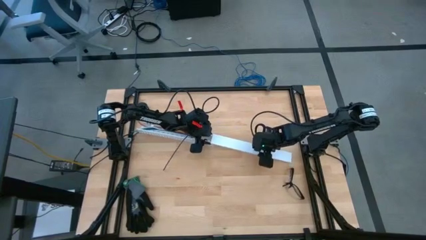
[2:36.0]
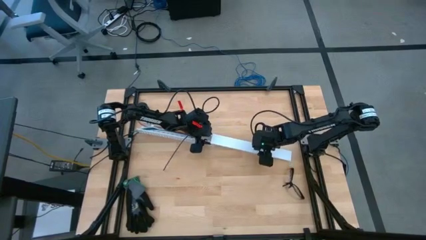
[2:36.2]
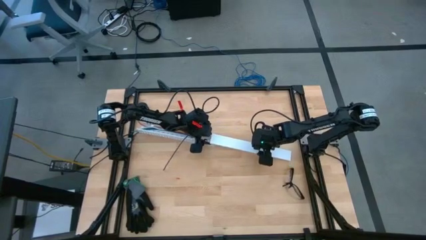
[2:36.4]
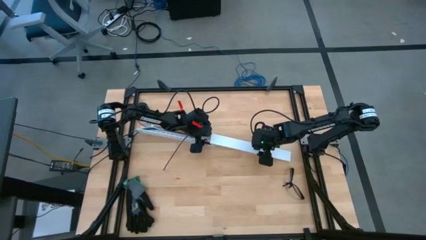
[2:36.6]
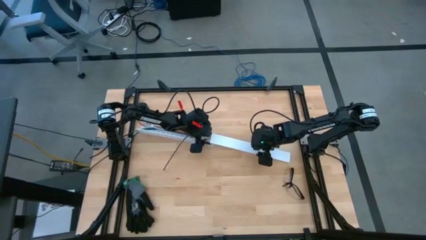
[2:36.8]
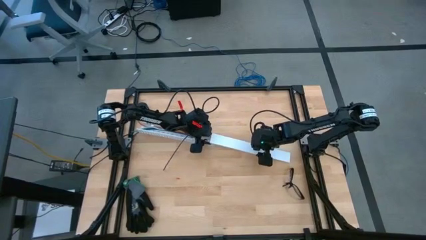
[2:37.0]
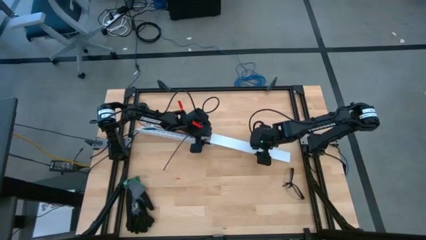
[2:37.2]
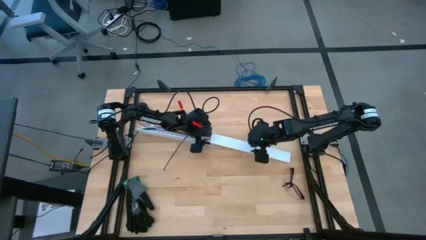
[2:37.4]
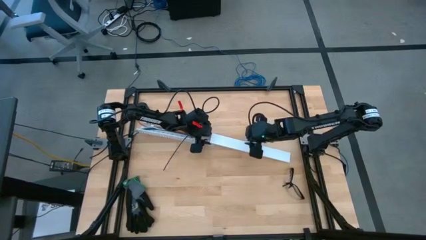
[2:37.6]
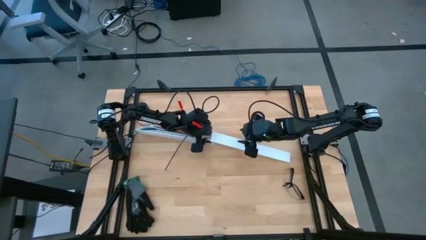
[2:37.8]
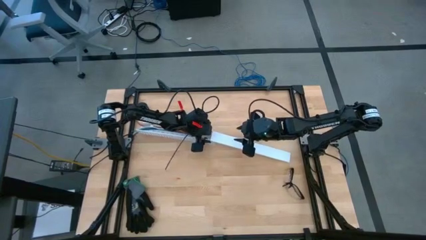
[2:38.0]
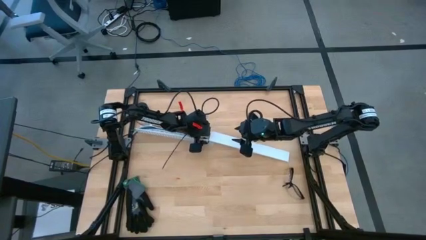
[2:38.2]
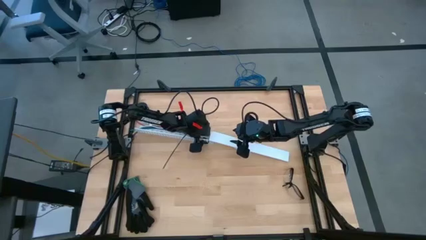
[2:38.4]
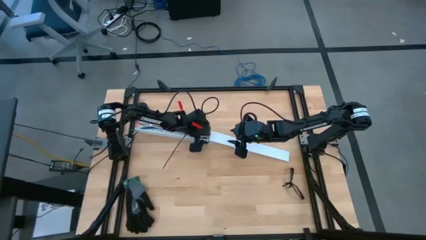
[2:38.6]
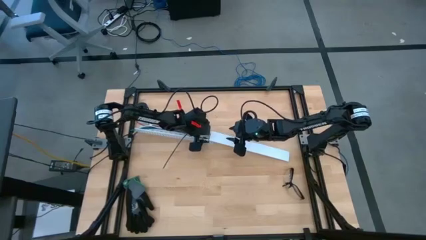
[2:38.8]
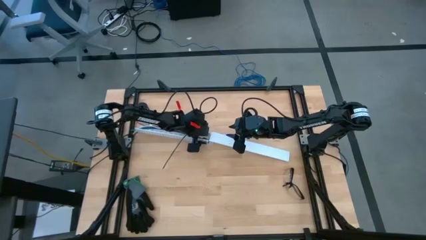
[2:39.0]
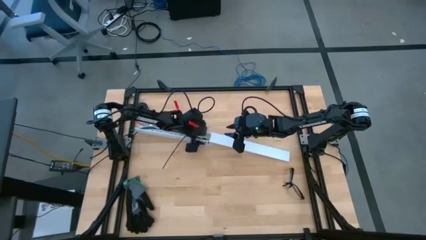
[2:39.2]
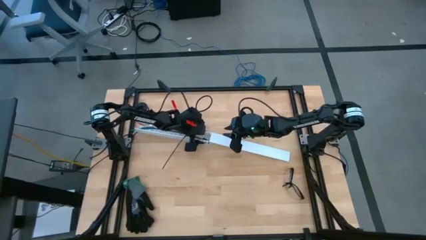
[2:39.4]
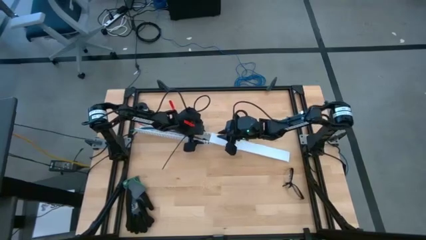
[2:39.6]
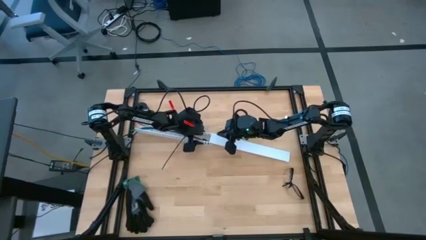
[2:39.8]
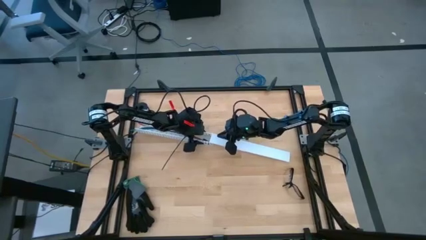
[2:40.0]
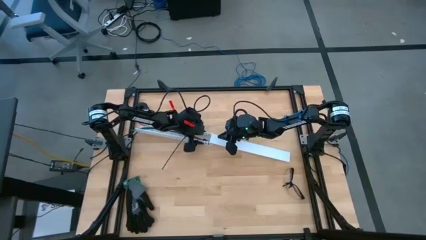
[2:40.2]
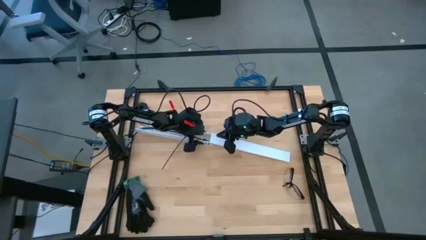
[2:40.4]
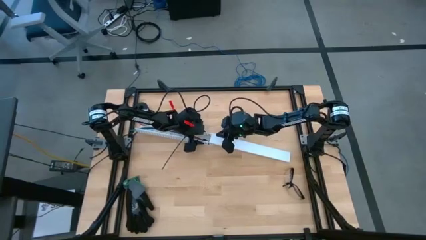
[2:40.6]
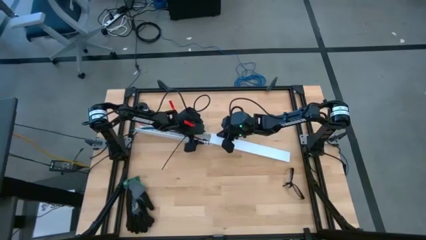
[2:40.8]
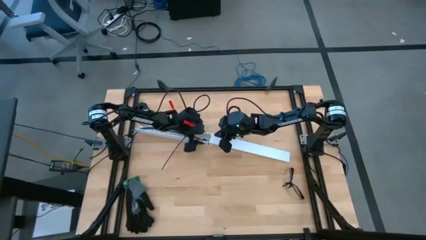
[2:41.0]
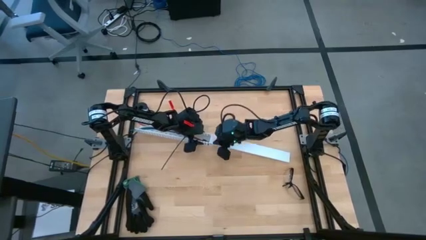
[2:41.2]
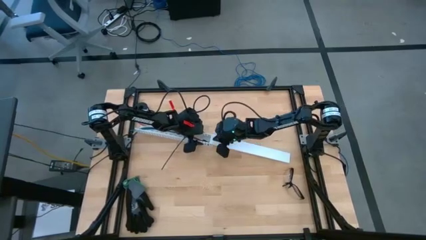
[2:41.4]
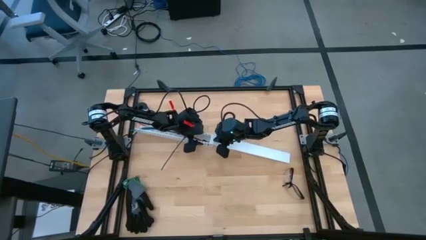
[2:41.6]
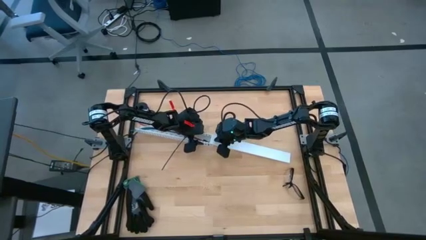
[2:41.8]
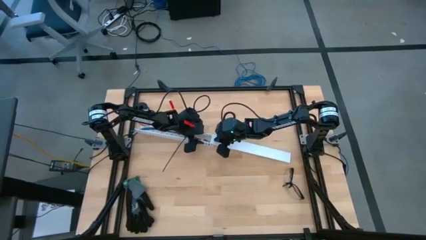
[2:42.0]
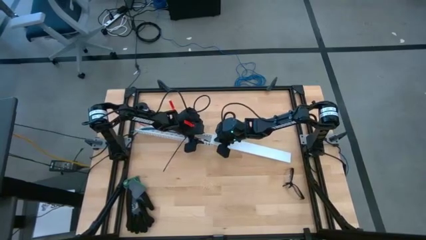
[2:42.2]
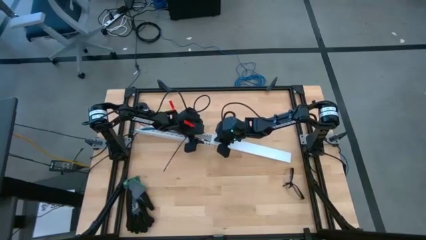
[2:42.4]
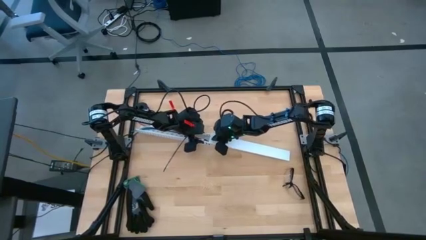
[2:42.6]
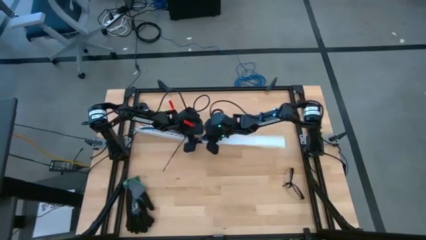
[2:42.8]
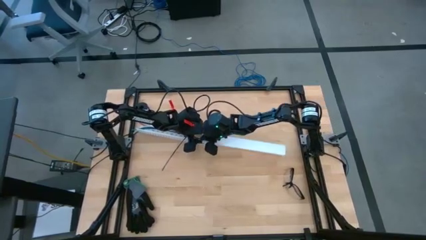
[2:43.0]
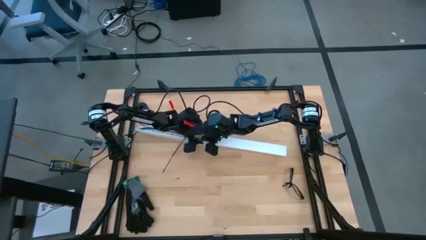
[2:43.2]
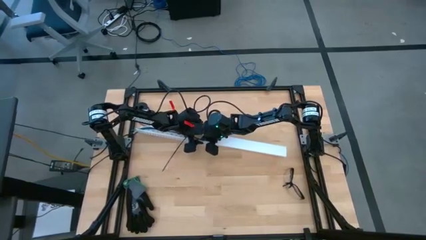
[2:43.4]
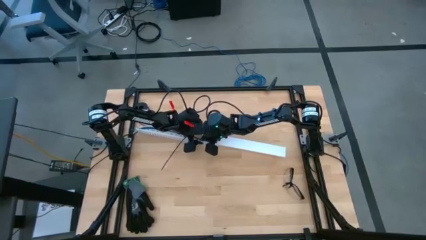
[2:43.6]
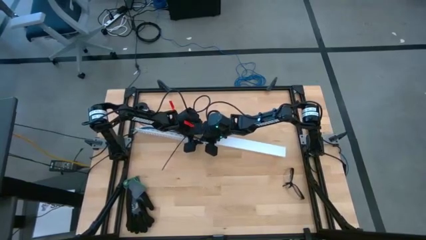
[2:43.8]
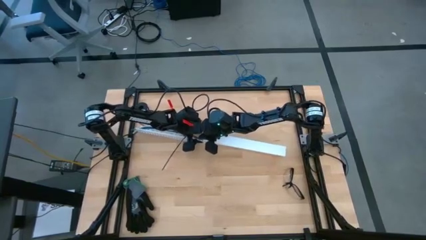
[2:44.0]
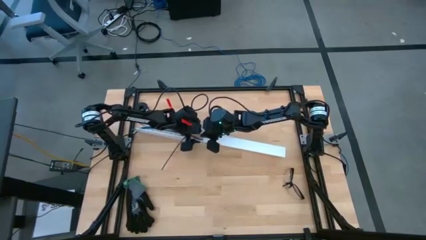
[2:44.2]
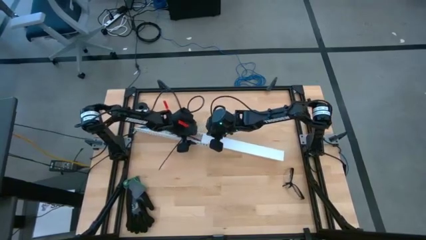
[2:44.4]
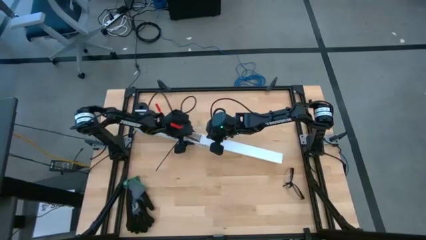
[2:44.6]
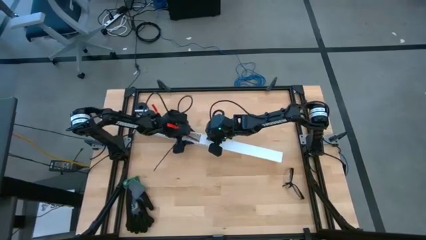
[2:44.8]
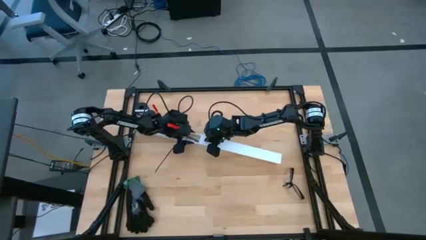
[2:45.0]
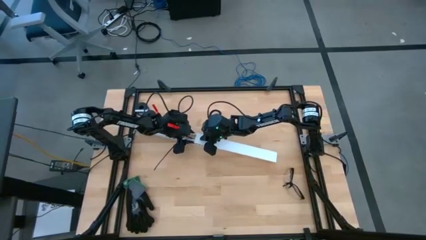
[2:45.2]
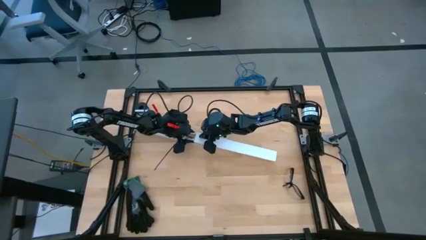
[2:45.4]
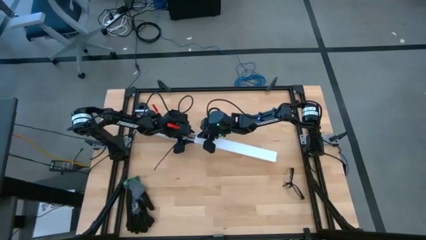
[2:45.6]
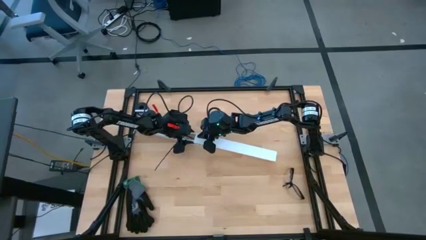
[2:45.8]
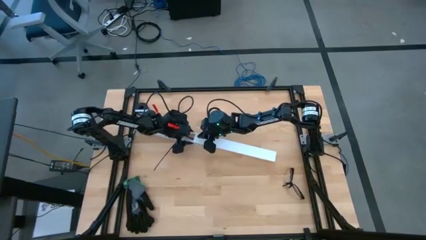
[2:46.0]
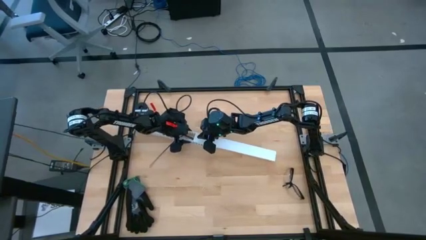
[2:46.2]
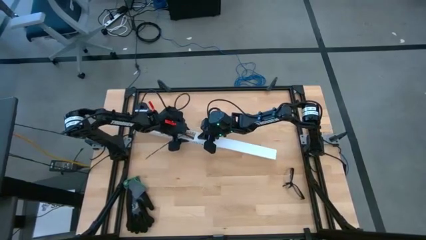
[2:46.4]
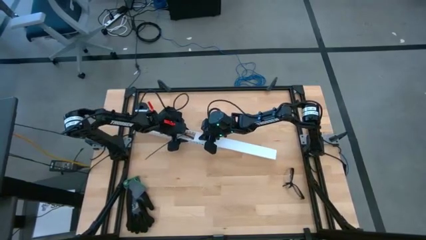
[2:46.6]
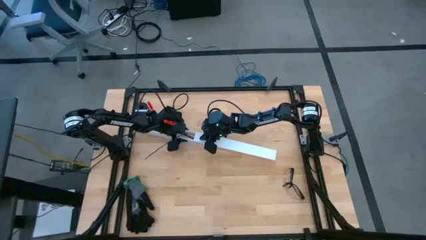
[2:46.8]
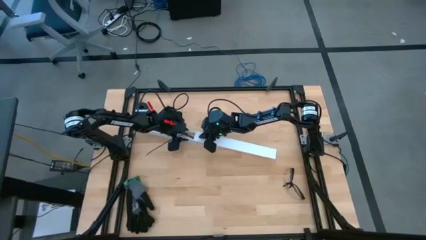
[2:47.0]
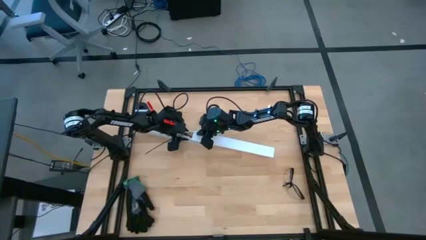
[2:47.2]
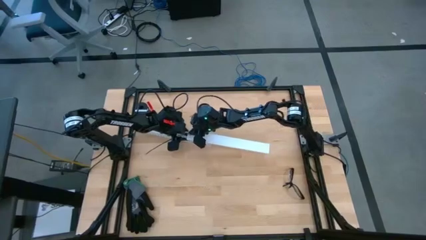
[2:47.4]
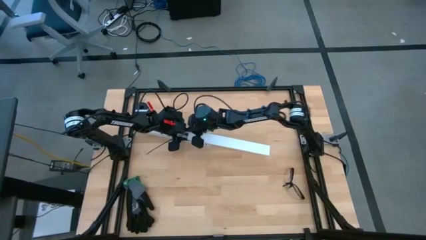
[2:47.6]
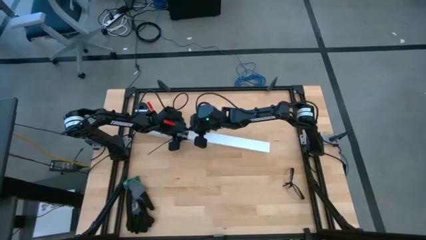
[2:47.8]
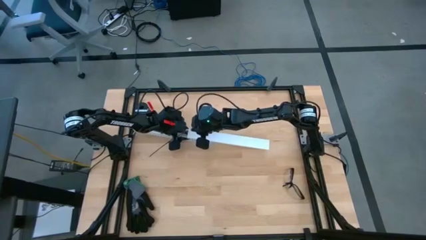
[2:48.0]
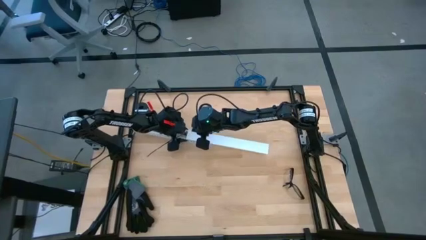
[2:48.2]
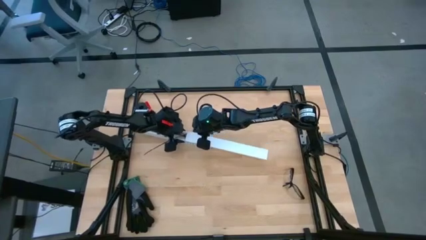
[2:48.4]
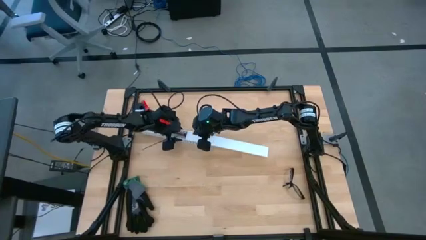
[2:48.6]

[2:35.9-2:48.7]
Task: Ziptie cables
Close the white cable duct

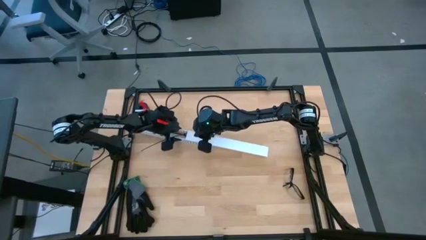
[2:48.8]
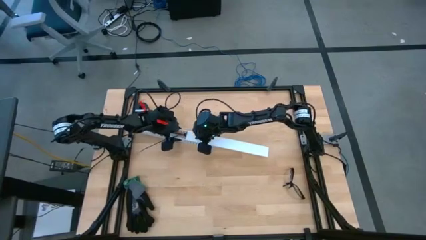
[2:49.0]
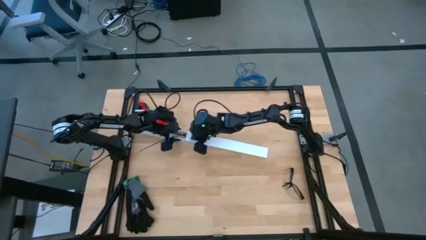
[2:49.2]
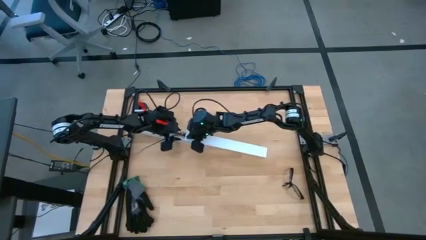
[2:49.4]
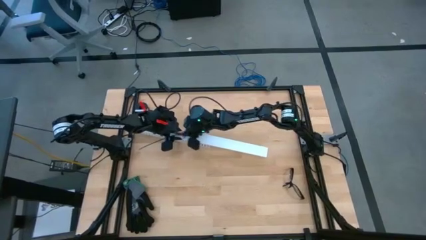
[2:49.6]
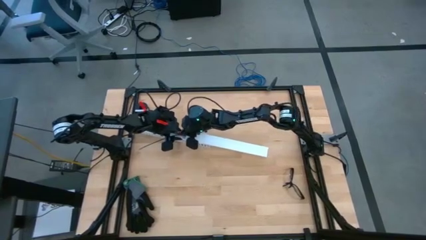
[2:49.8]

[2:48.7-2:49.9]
Close the white cable duct

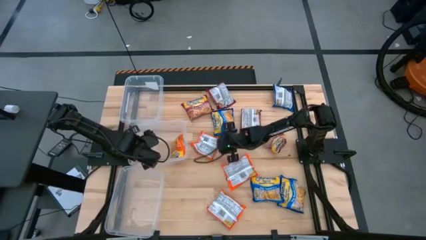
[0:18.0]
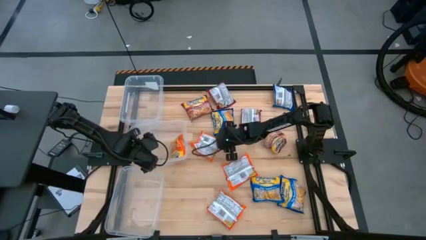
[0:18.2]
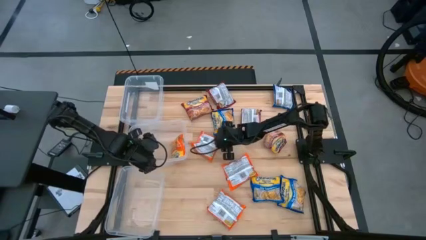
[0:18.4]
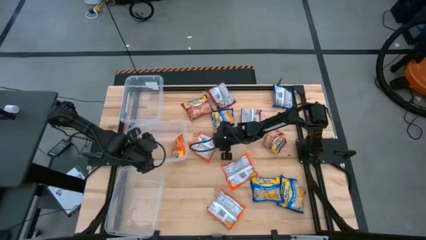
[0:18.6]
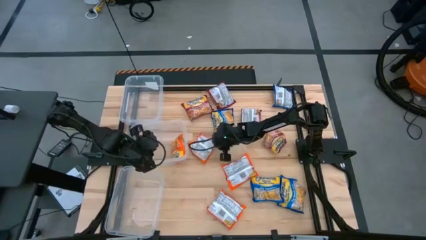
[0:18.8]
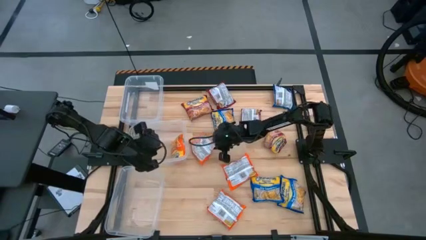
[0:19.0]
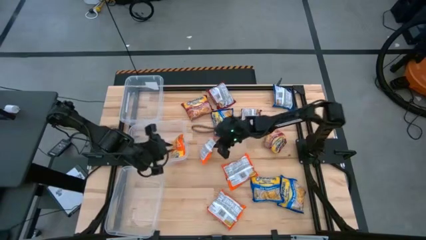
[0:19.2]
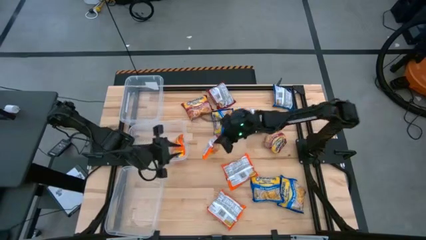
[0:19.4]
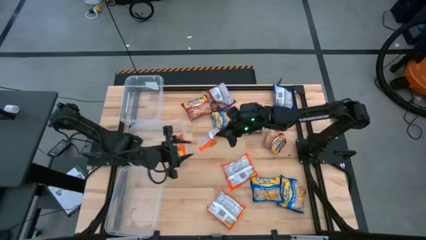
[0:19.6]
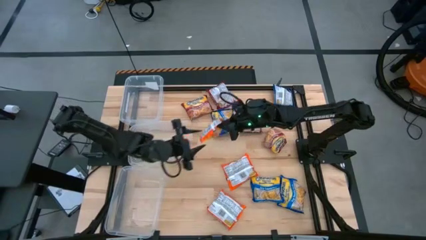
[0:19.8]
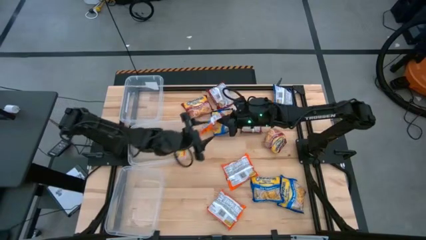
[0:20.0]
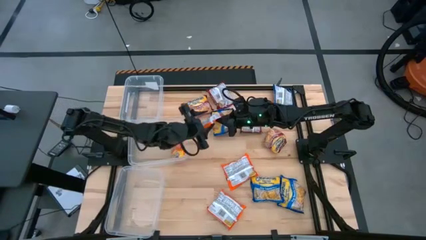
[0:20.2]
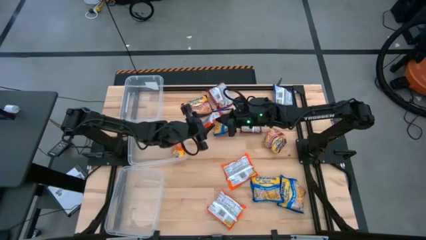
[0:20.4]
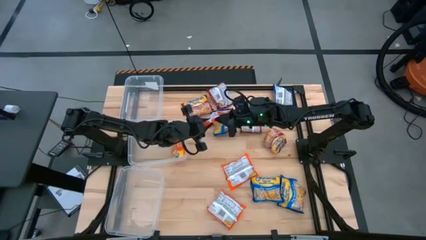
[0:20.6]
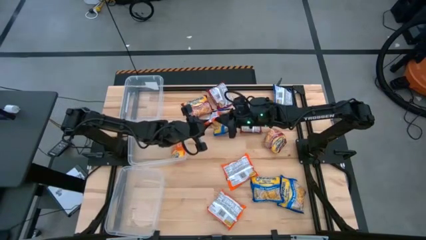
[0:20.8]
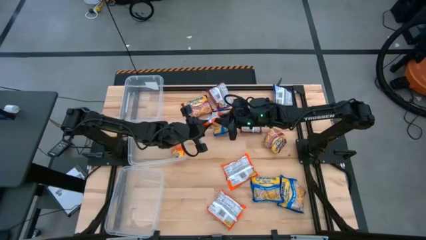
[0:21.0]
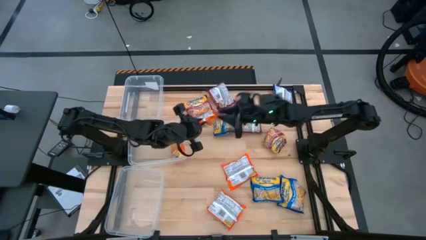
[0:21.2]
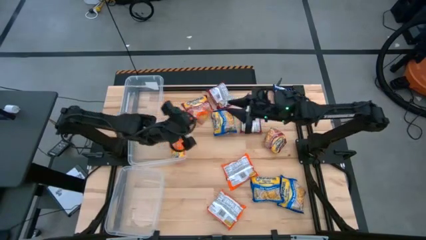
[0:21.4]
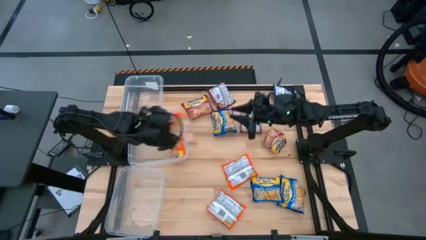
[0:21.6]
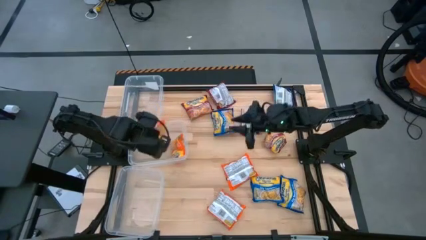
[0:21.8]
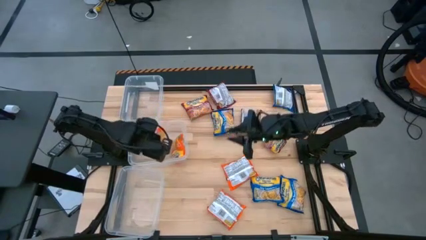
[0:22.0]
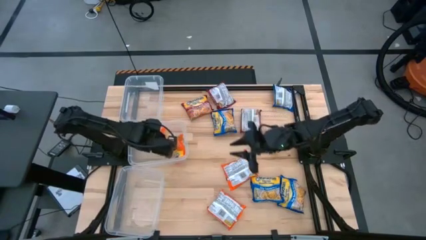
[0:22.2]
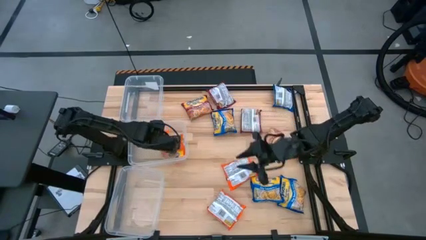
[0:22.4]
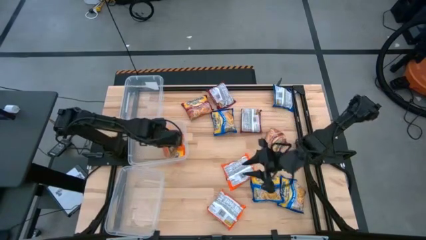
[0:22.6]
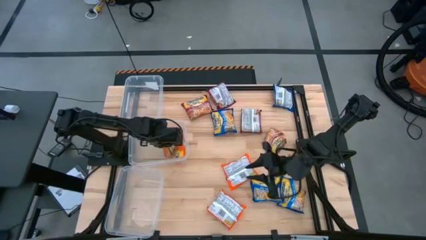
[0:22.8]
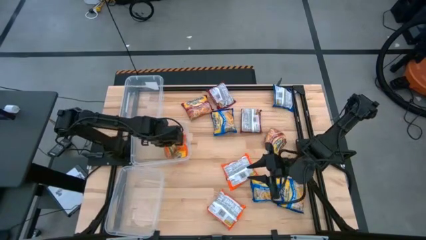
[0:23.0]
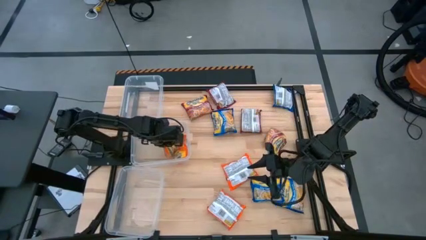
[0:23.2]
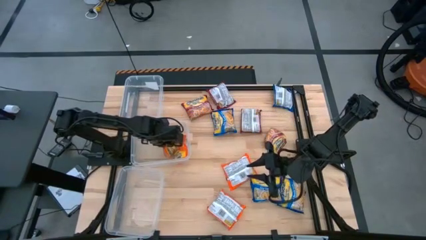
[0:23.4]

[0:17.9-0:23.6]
Task: Sort Maruchan noodles
Put the orange noodle pack into the middle transparent bin
